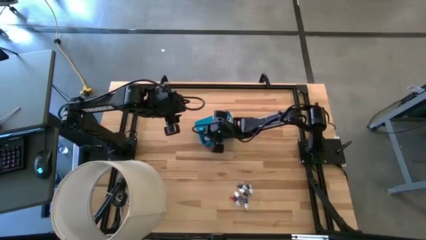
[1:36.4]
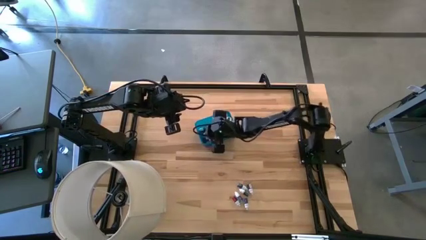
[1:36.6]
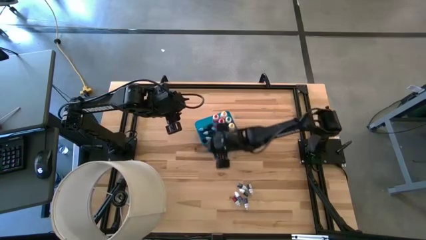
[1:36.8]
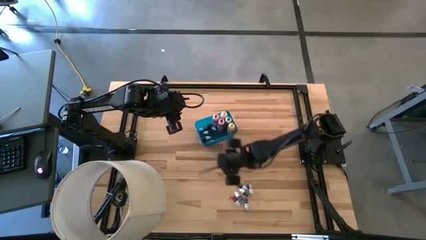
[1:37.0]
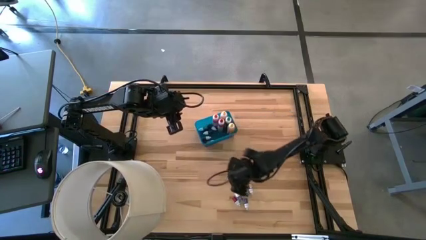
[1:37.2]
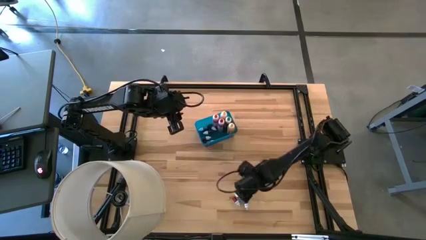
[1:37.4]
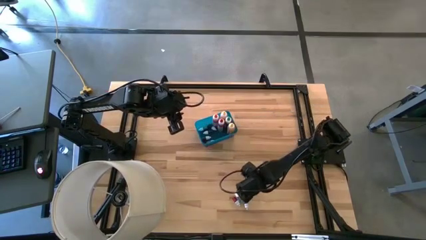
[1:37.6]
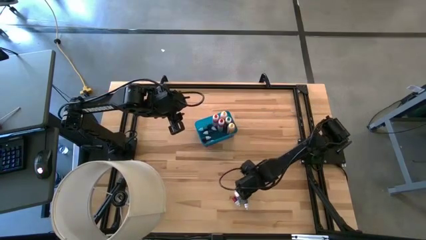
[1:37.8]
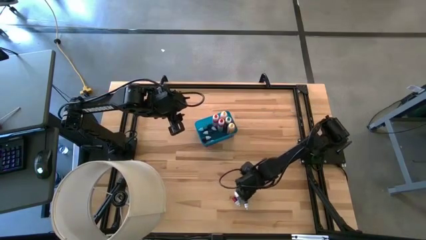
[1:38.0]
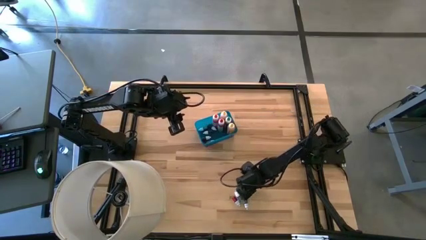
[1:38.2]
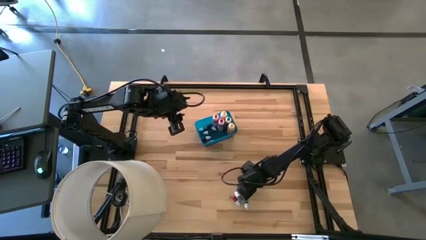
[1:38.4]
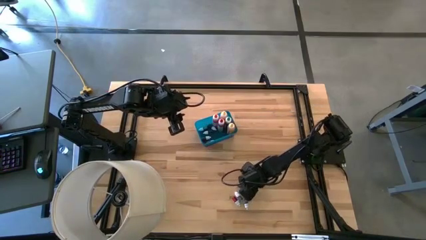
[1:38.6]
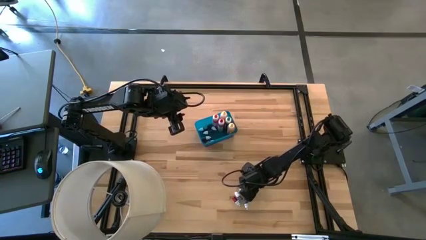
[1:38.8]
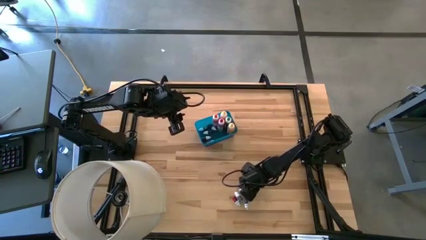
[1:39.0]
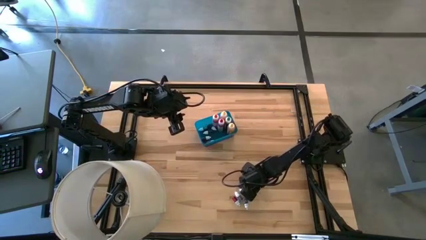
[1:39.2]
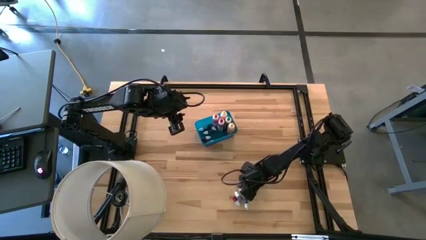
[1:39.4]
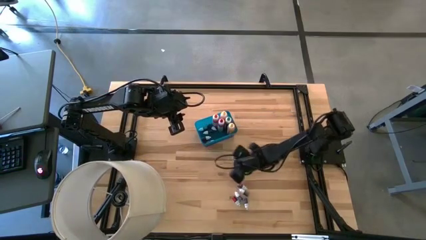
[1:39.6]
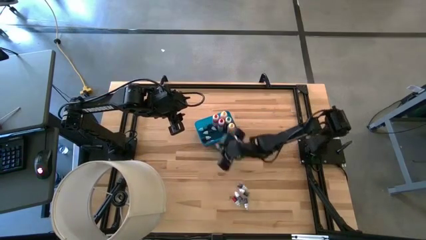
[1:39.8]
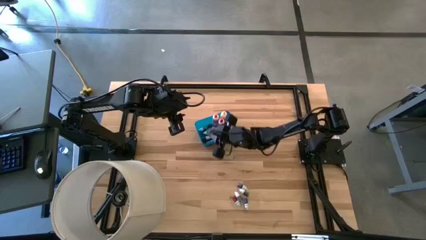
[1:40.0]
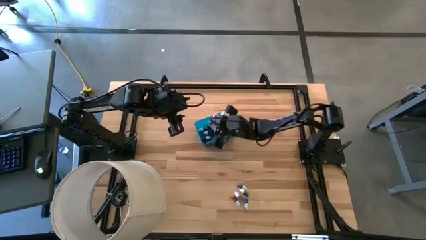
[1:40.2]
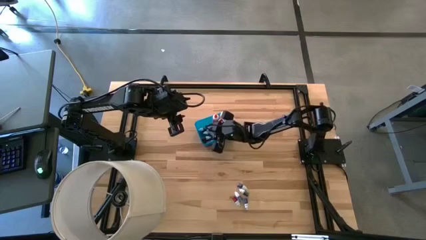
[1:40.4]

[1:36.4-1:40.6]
Task: Pick & Place food coloring
Put the small right blue food coloring bottle into the bin

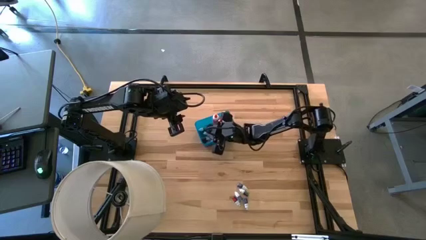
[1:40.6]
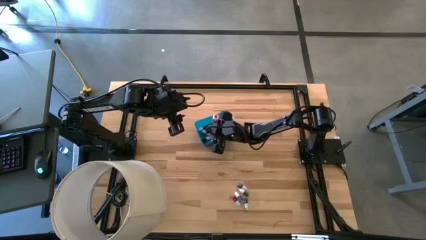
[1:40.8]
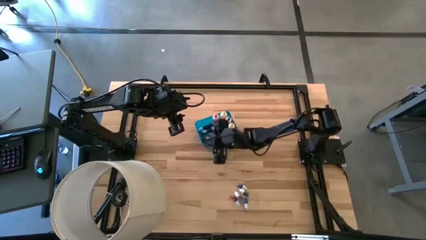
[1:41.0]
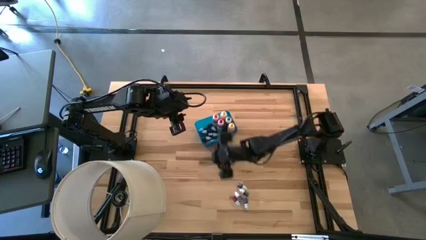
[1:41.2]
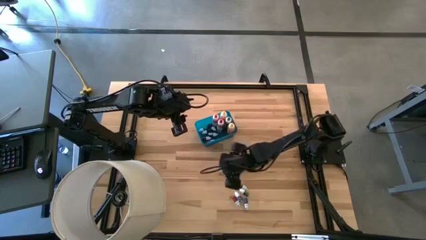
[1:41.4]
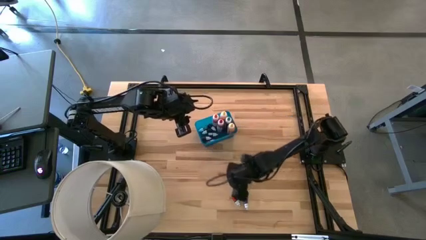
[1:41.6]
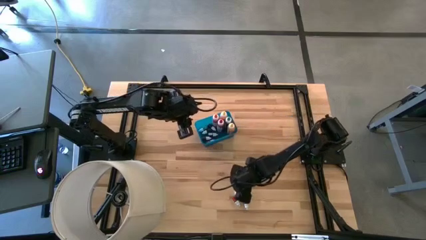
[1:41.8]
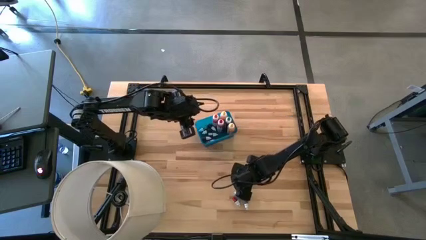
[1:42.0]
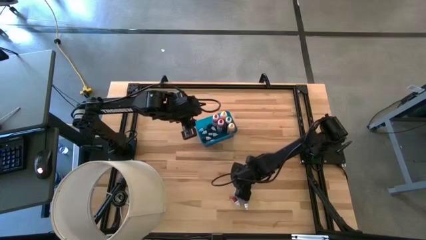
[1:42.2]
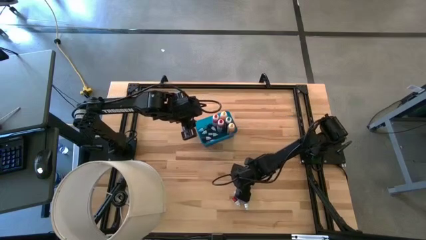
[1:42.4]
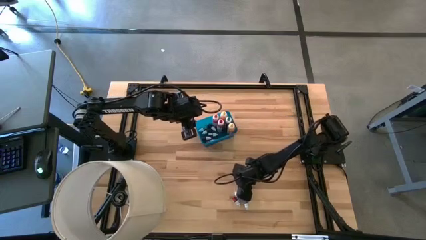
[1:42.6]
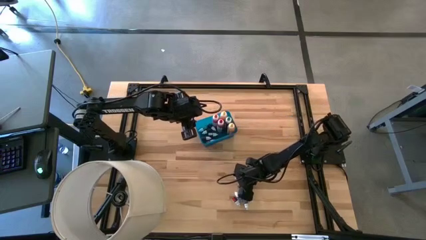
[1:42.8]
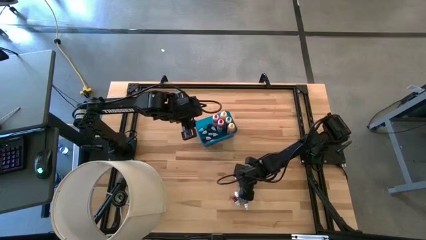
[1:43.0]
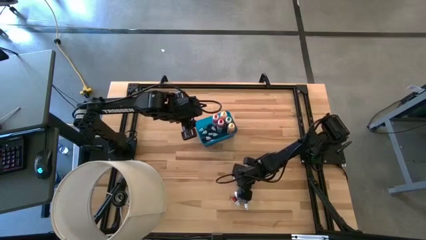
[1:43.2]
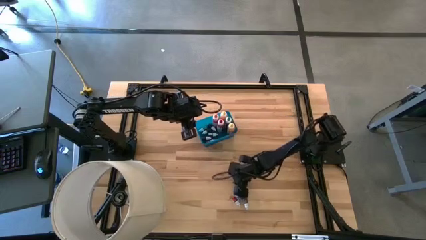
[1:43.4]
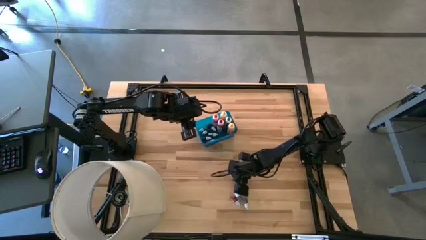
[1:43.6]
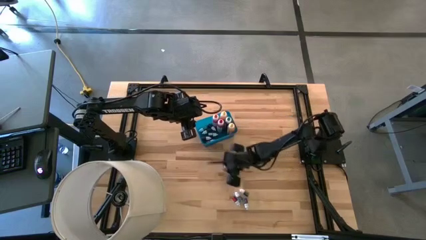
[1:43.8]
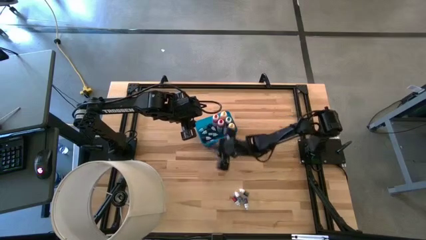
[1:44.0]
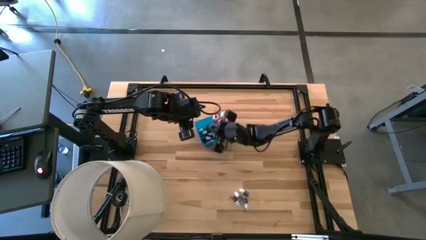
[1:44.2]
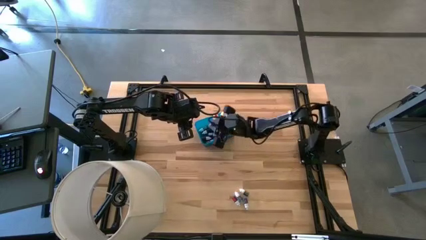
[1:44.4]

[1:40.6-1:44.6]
Put the top small green food coloring bottle into the bin

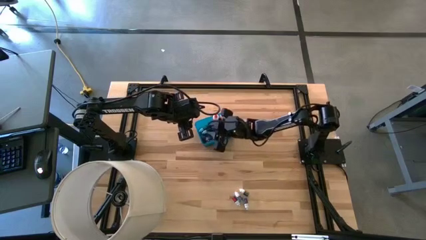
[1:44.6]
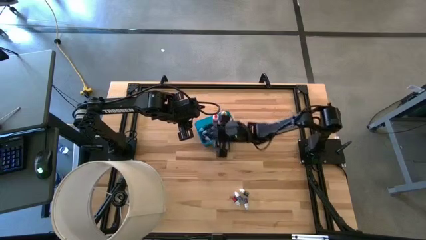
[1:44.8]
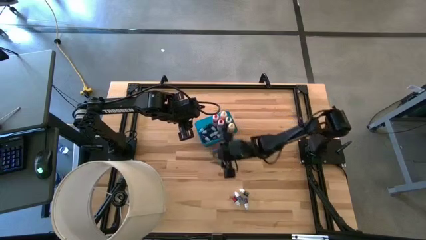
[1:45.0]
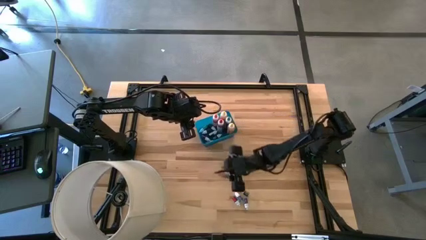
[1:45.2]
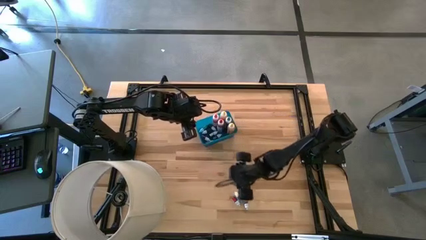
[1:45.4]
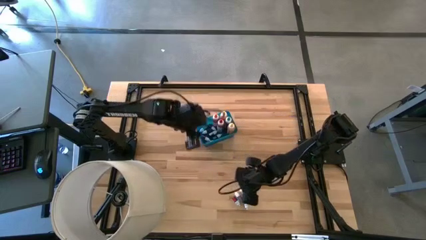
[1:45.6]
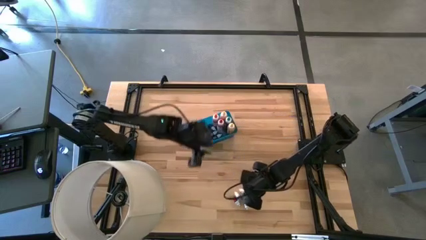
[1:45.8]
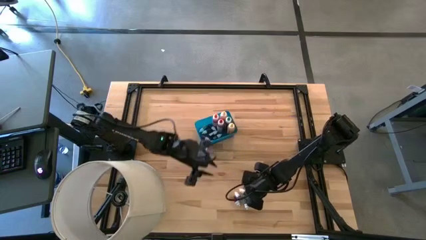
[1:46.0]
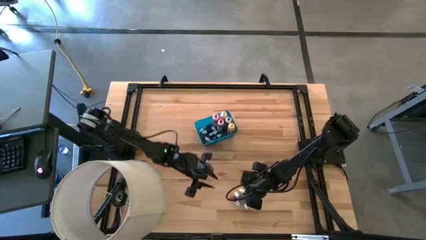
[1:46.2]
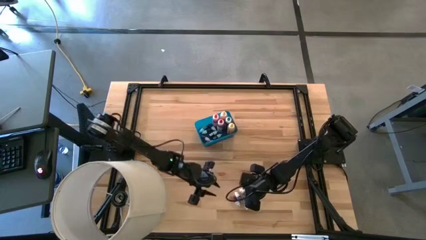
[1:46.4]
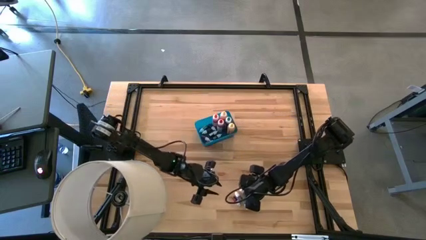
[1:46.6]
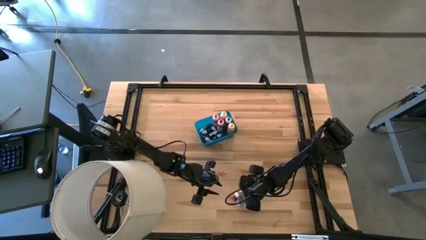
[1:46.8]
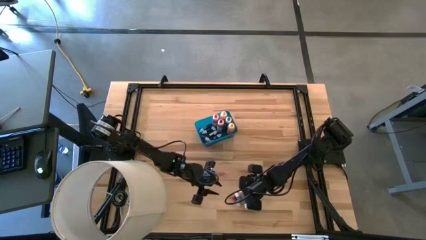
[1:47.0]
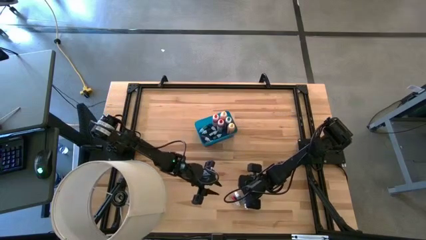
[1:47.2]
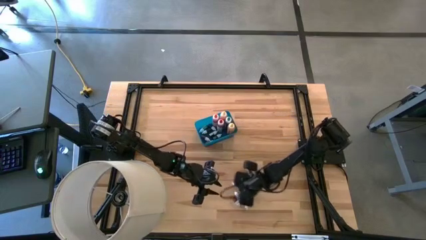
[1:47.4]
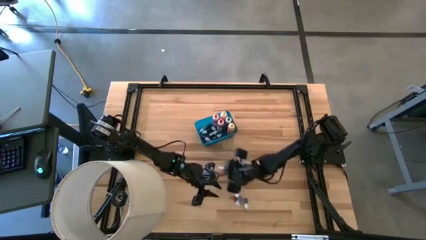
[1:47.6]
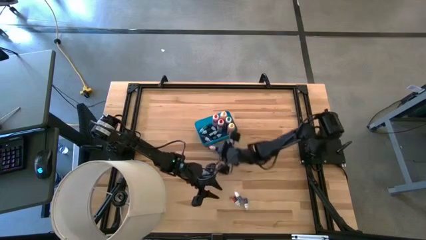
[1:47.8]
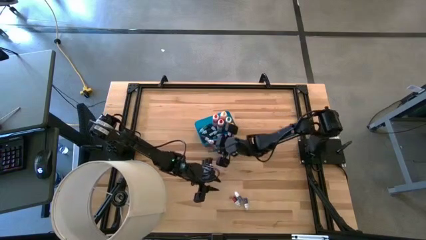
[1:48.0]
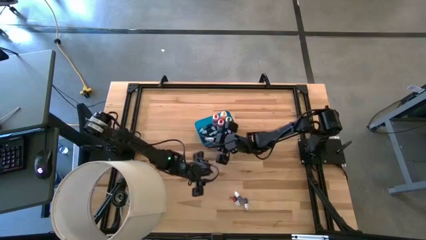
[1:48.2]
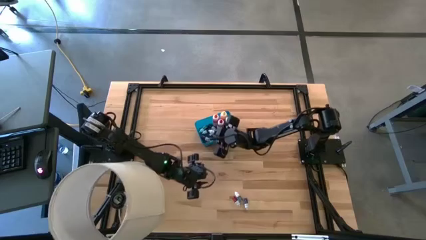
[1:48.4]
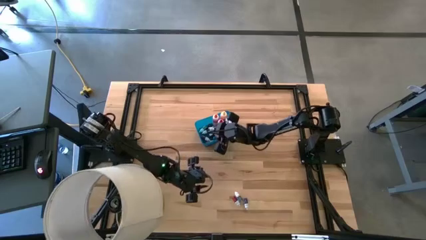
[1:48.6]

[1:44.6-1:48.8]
Put the small green food coloring bottle into the bin

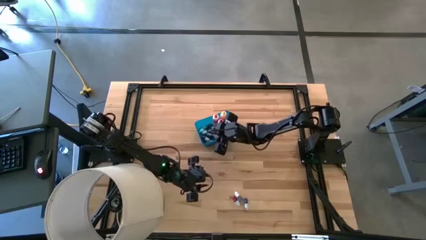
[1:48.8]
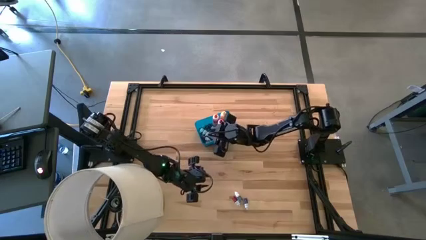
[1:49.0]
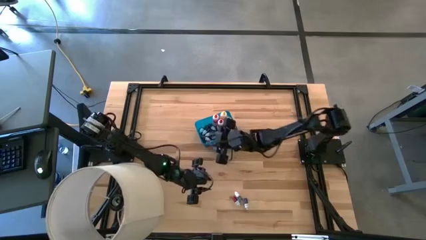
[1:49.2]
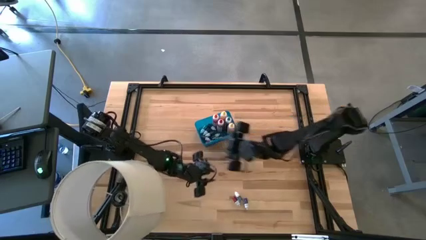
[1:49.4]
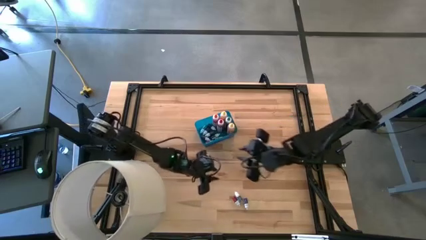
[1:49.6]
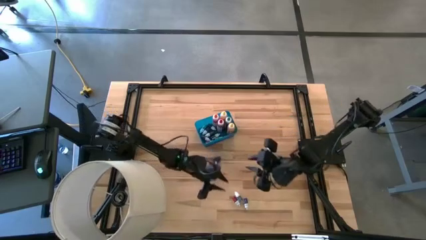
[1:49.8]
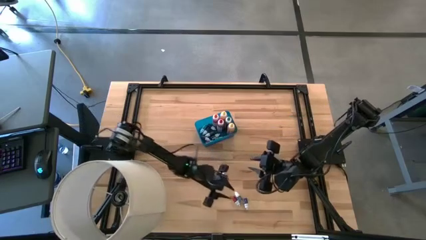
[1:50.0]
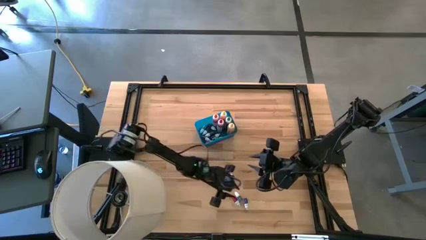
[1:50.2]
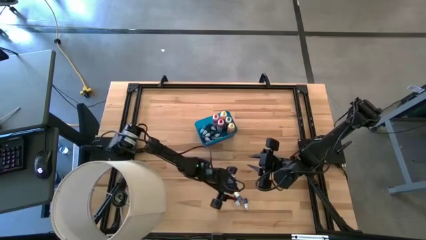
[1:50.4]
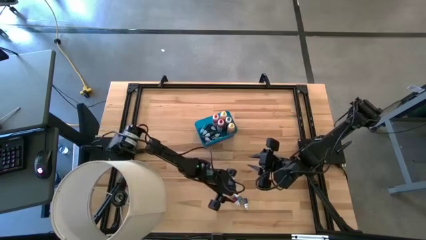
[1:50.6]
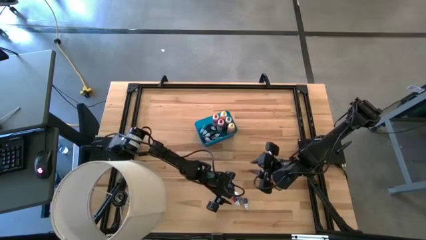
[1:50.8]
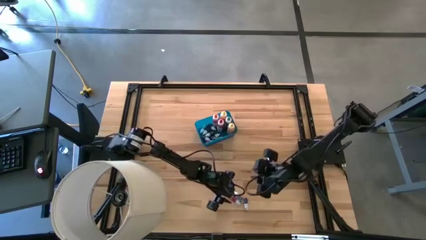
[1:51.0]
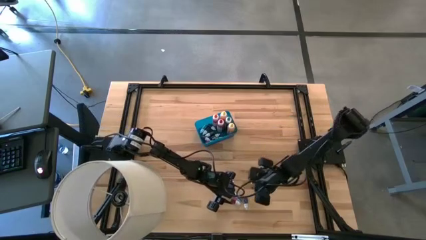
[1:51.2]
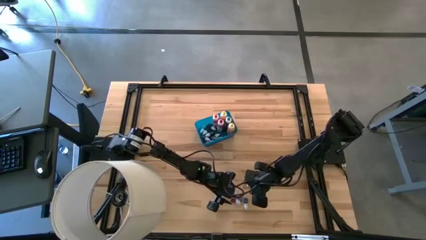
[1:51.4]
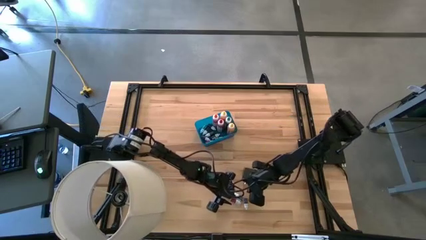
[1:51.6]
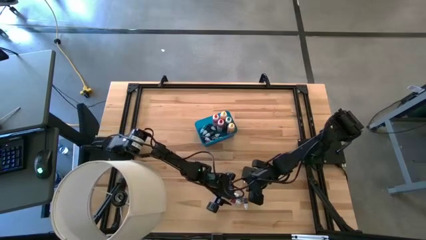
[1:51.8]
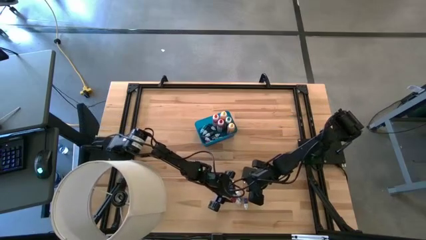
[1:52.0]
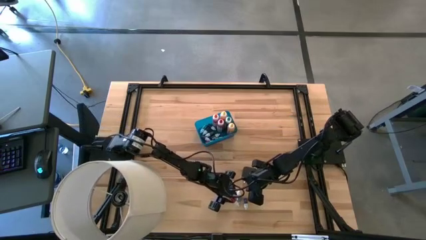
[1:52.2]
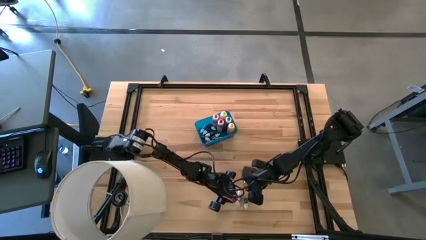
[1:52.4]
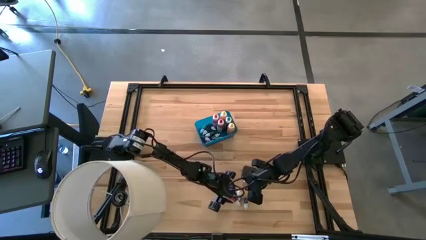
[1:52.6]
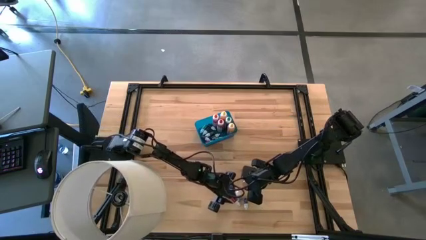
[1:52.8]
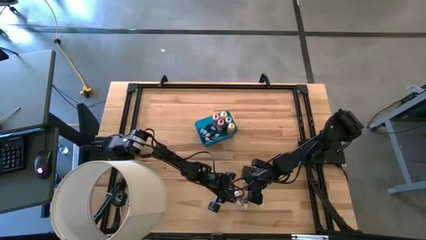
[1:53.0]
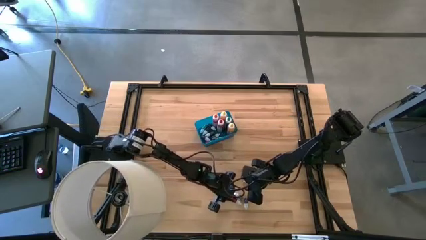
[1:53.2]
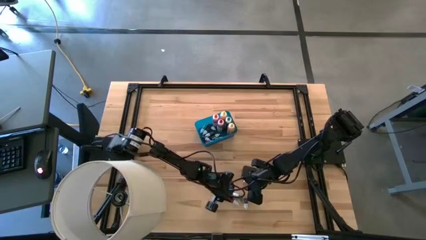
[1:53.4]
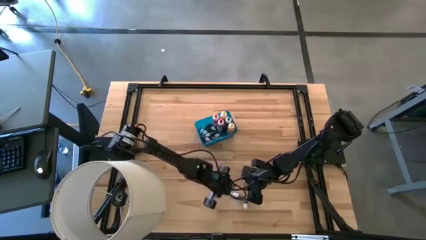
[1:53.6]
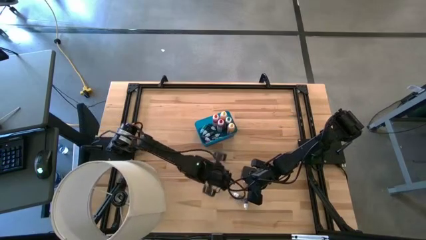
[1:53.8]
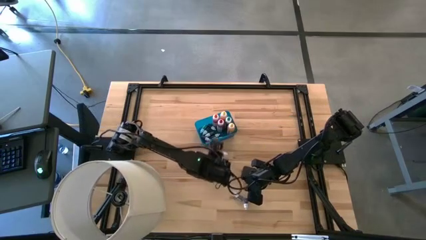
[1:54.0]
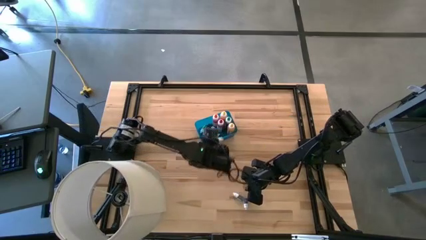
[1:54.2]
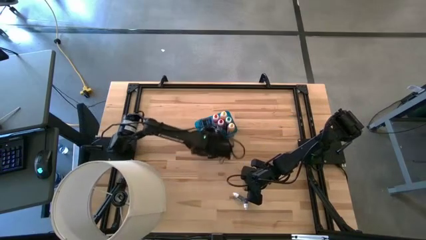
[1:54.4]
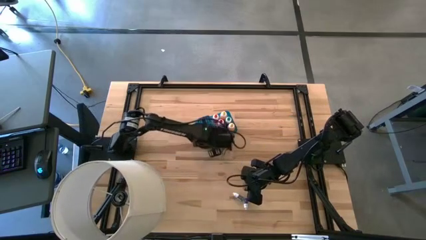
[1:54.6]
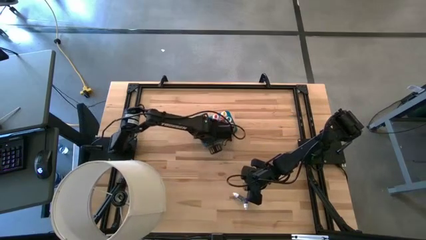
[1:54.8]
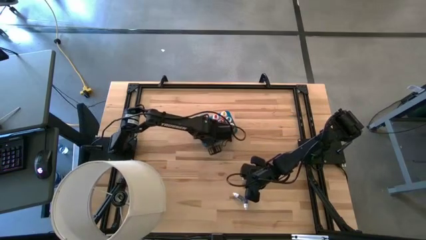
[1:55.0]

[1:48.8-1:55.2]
Put the small red food coloring bottle into the bin
